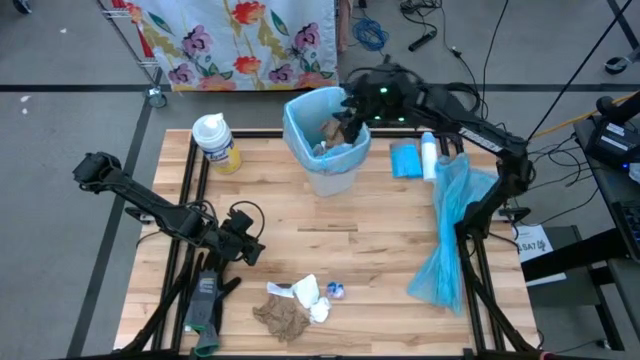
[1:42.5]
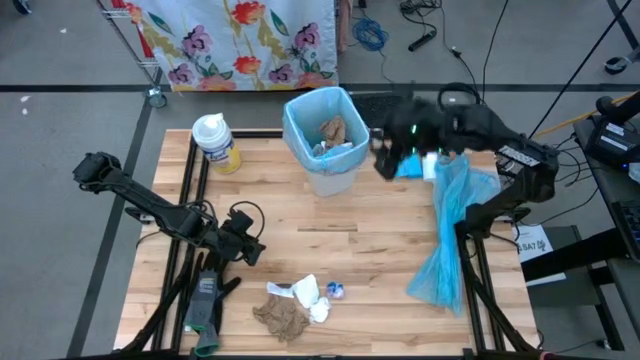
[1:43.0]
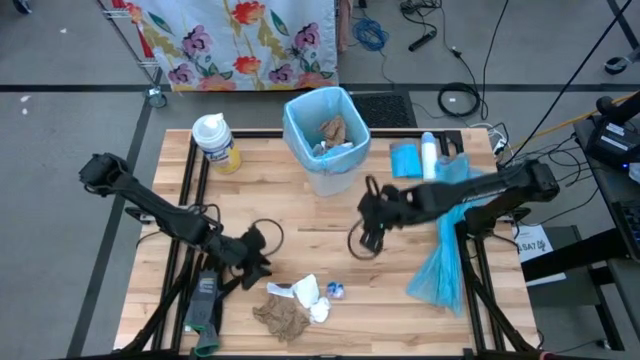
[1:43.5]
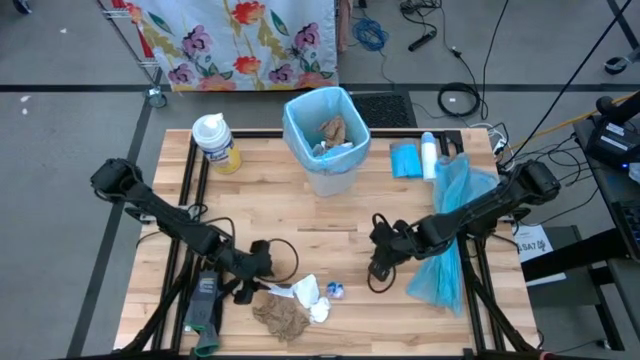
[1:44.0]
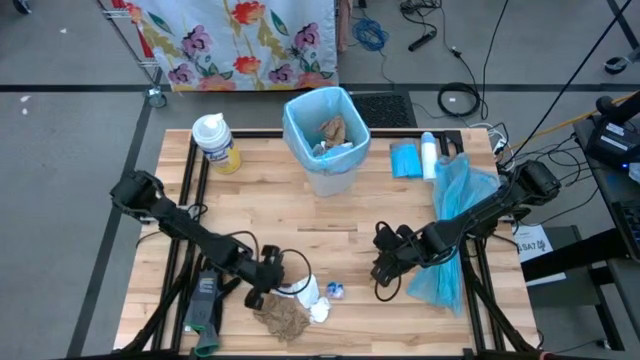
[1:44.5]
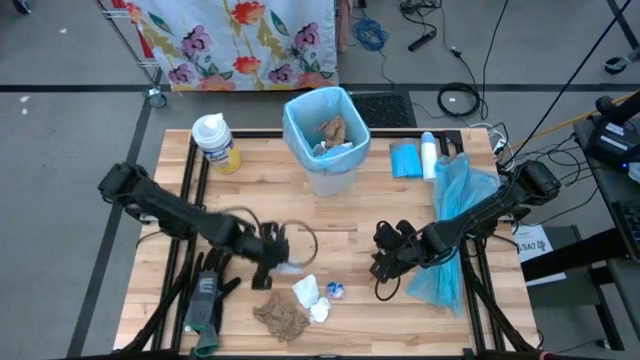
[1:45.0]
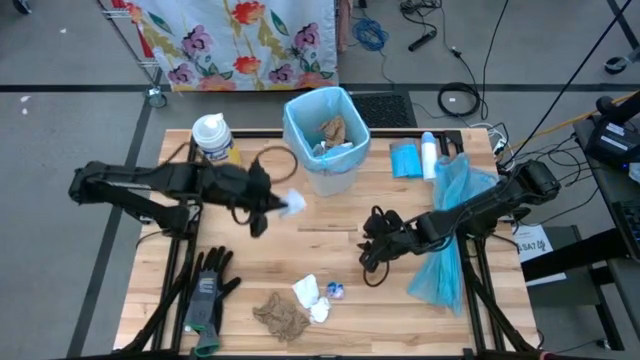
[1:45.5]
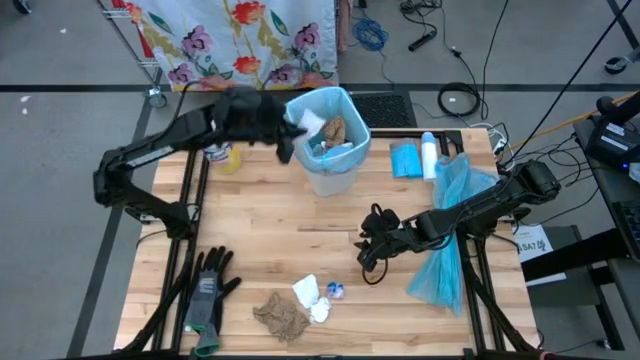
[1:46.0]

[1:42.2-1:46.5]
Task: place trash/remove bag and relplace
Put the white black paper into the trash bin

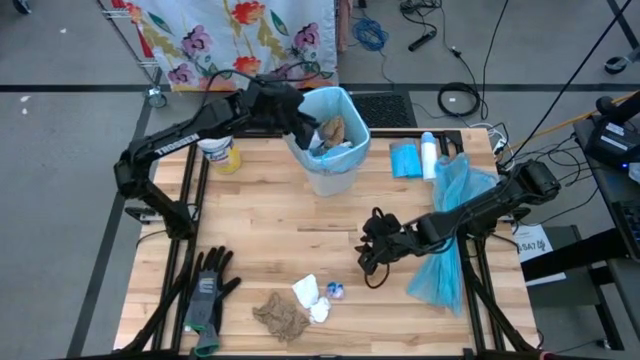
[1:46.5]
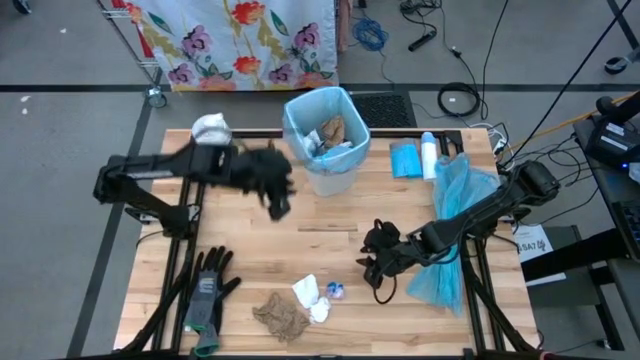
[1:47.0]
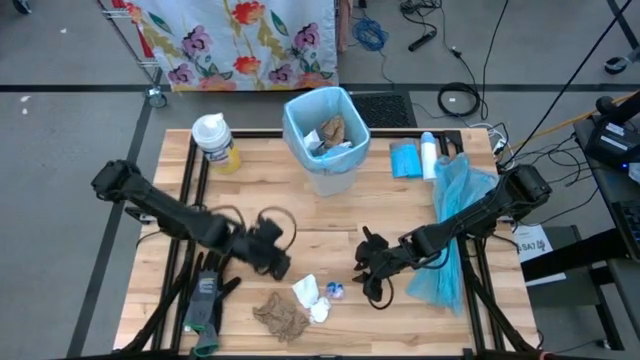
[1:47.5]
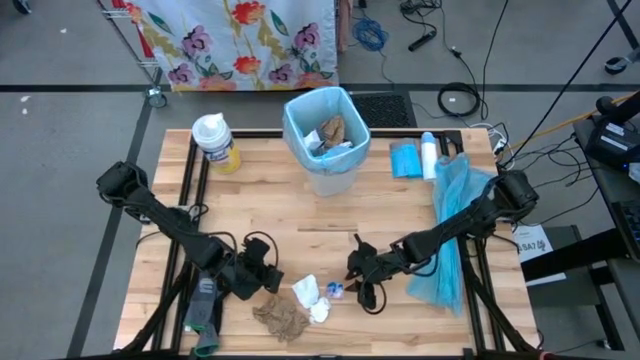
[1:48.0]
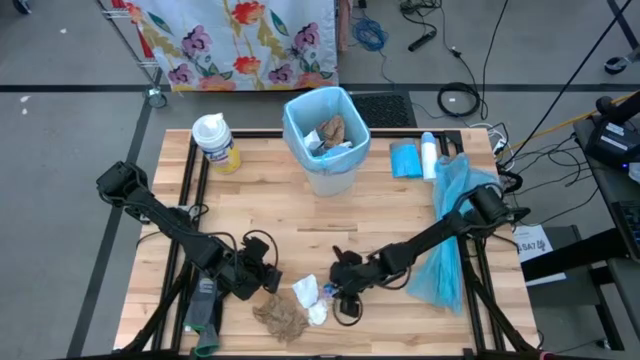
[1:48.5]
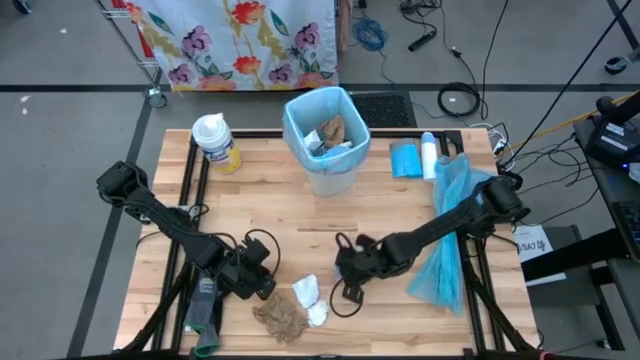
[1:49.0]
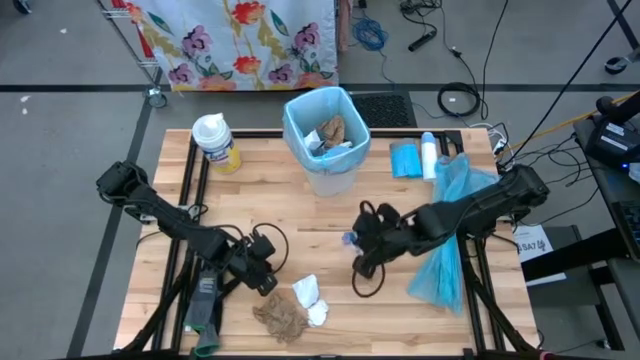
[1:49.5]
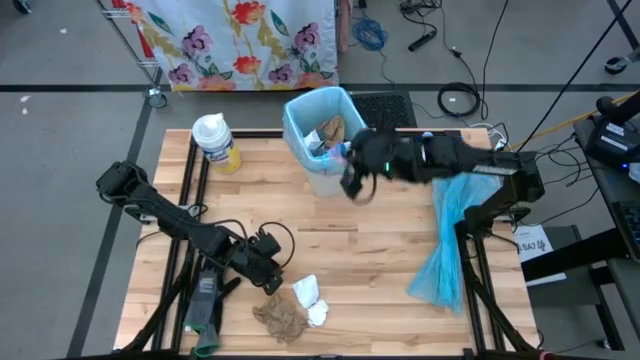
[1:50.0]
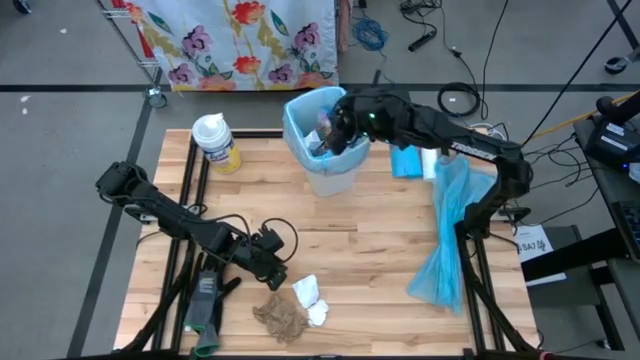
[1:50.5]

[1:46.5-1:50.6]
Put the pink plastic into the trash bin

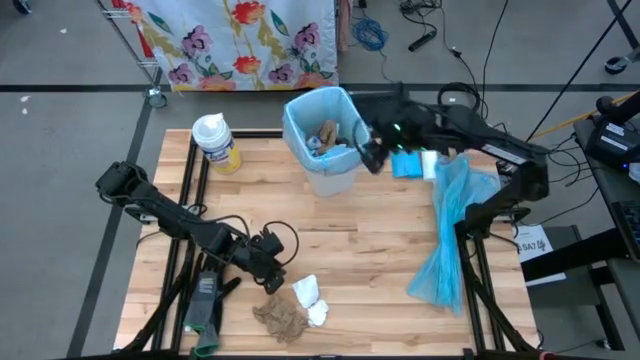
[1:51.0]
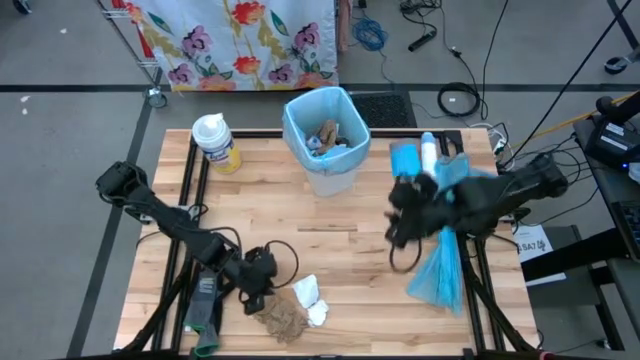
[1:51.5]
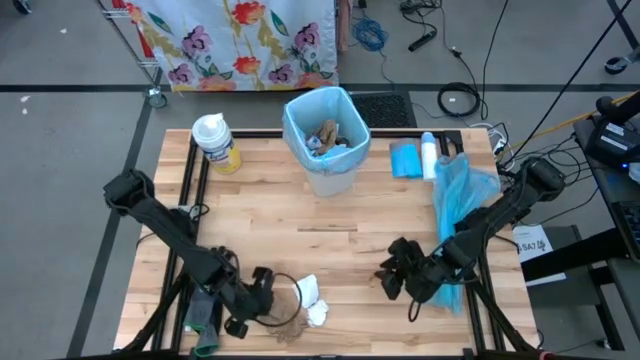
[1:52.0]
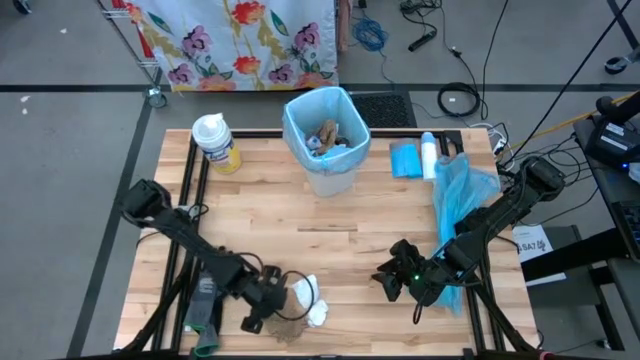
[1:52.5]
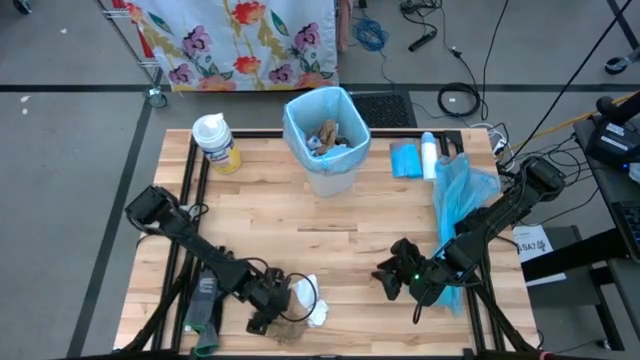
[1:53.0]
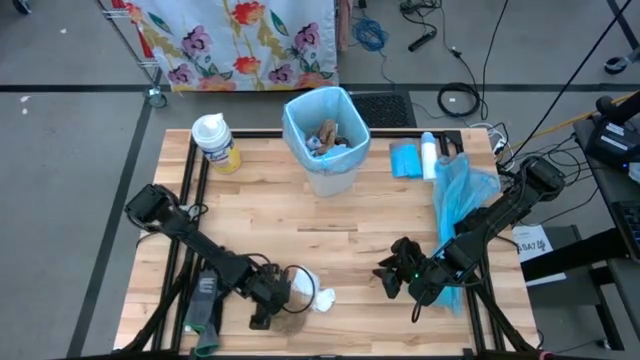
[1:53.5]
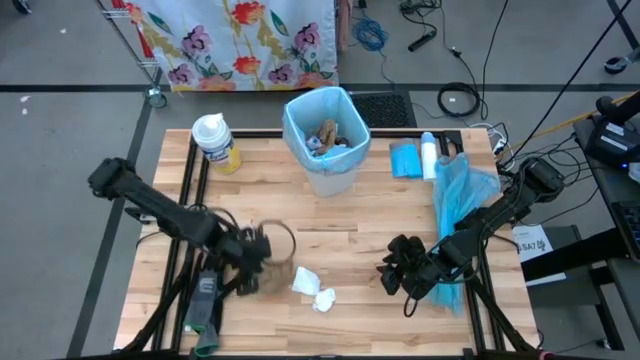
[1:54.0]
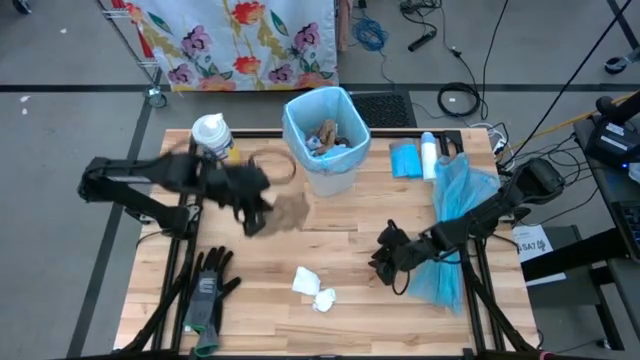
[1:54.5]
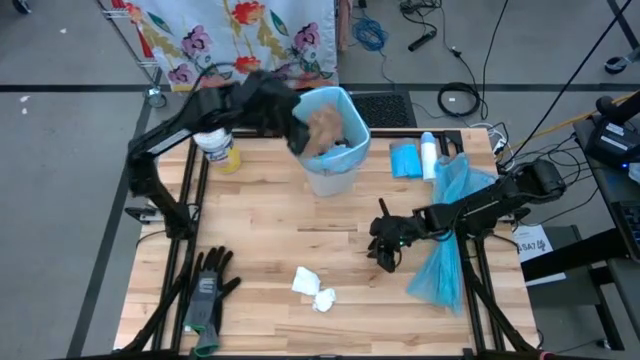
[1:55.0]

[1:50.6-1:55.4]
Put the brown napkin into the trash bin

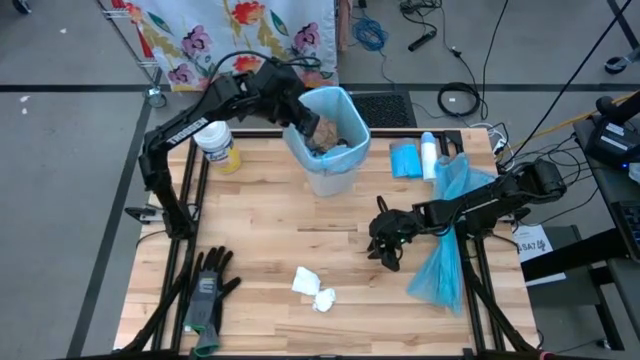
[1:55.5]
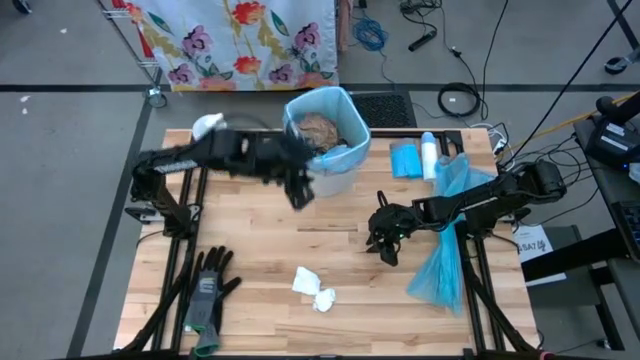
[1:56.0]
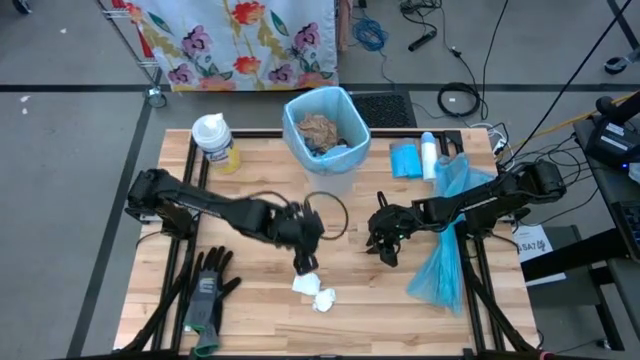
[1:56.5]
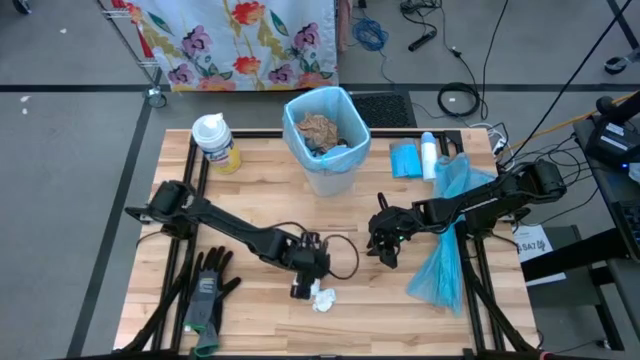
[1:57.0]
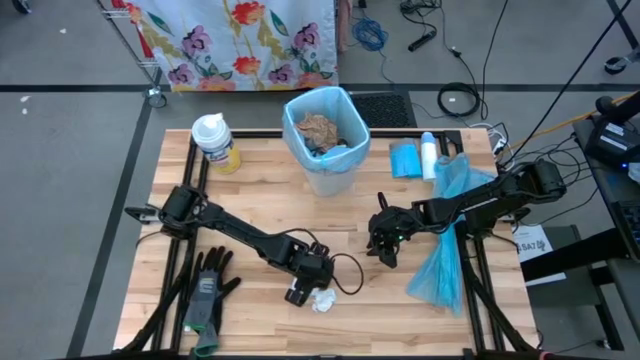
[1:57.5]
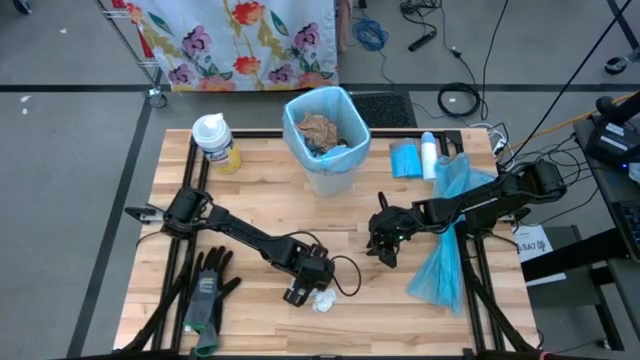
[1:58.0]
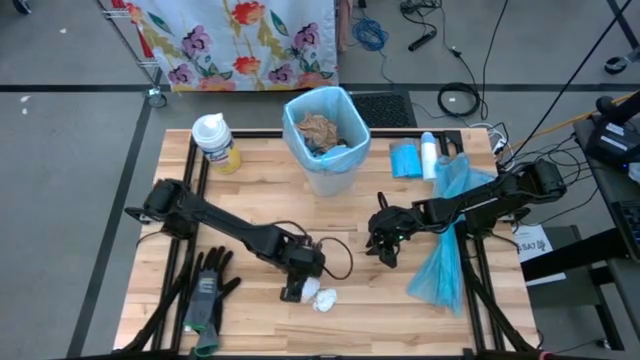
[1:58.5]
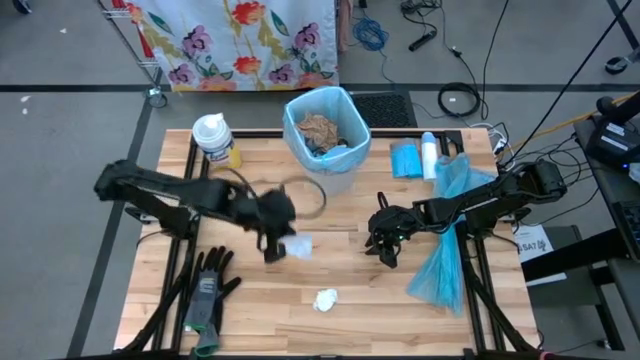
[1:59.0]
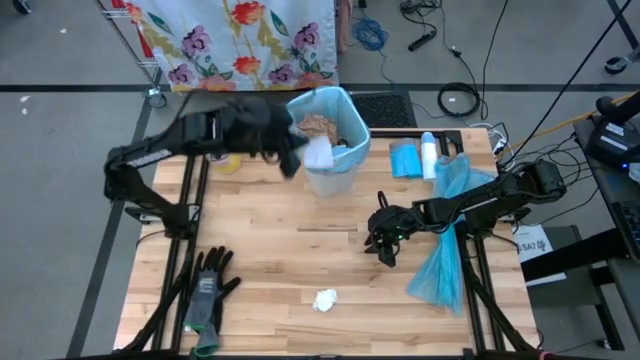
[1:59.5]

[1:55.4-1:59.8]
Put the white paper into the trash bin

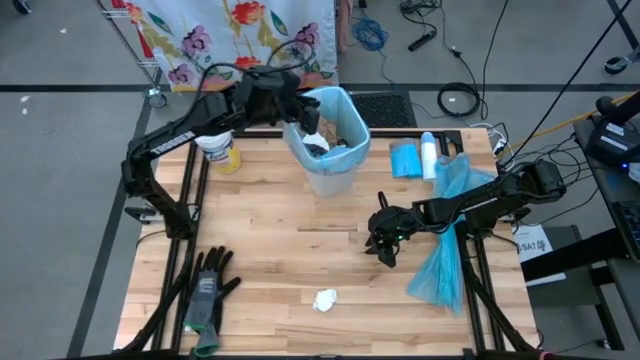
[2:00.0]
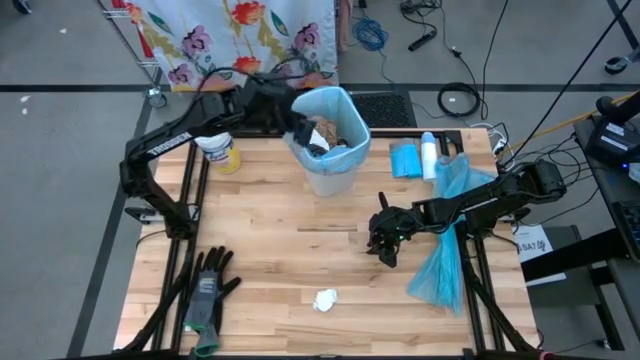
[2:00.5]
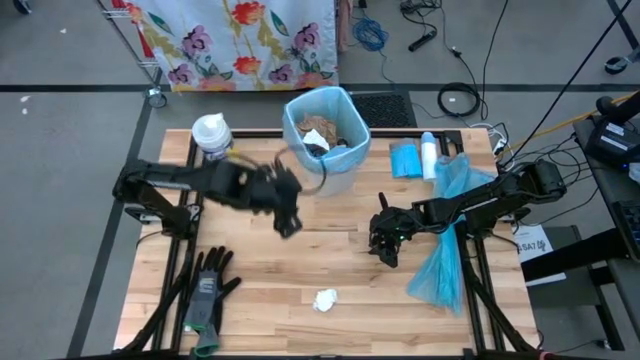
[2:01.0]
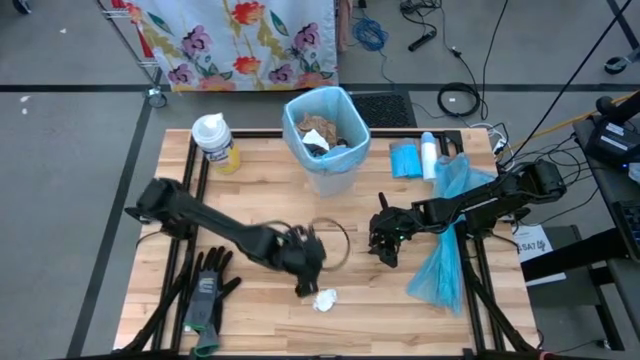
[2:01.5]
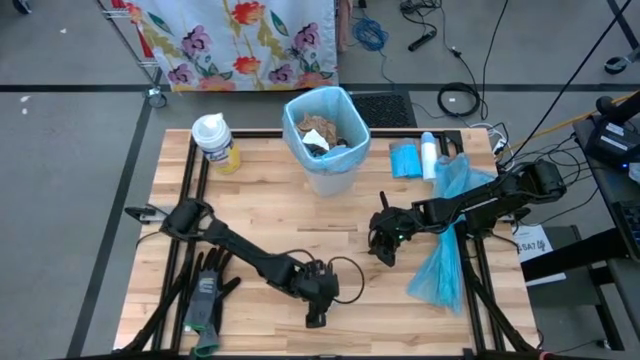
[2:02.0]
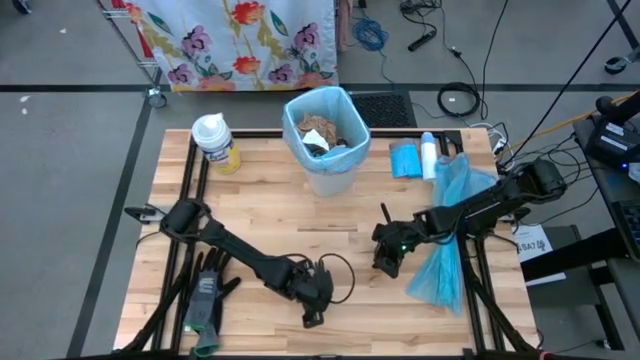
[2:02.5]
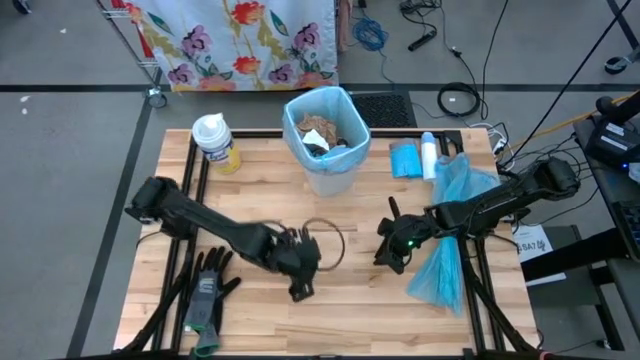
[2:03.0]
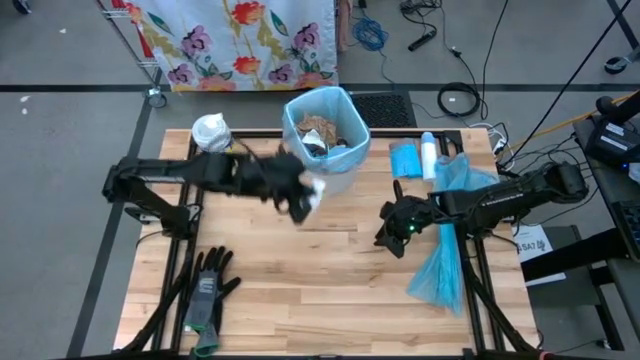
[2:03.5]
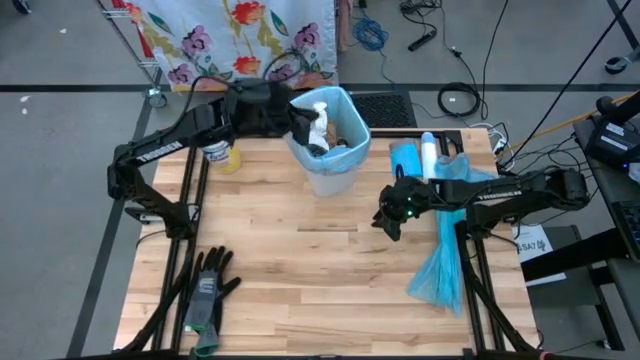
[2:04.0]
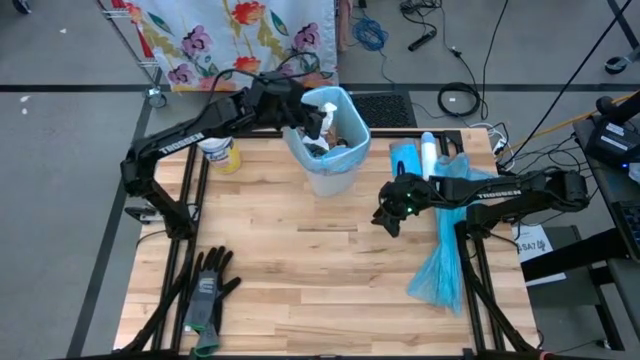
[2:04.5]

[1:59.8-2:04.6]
Put the white napkin into the trash bin
